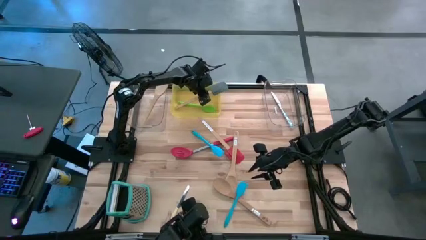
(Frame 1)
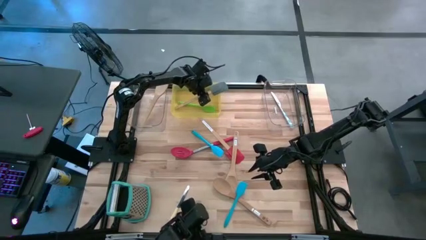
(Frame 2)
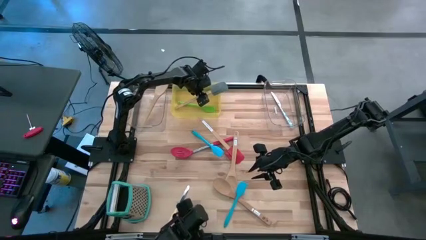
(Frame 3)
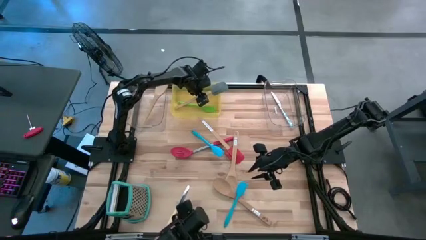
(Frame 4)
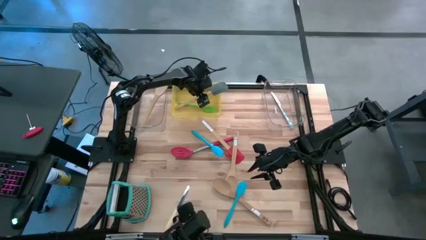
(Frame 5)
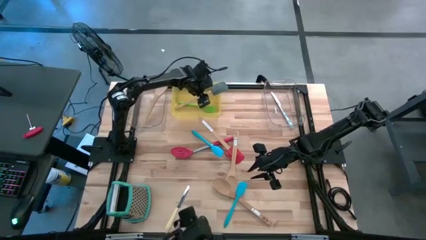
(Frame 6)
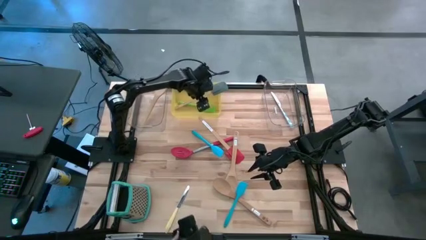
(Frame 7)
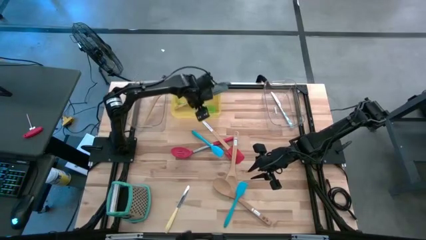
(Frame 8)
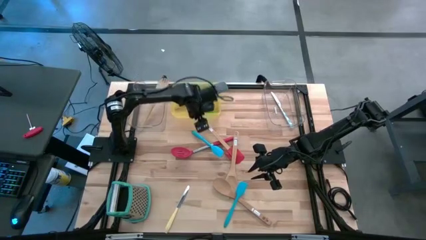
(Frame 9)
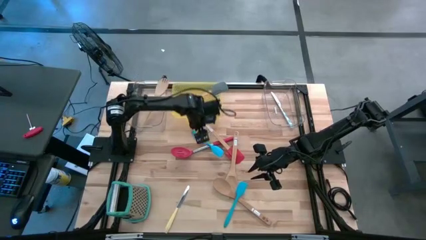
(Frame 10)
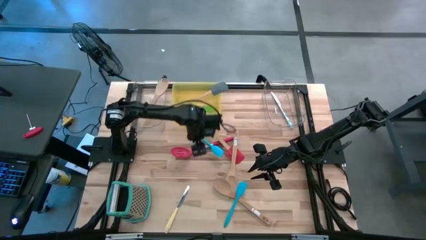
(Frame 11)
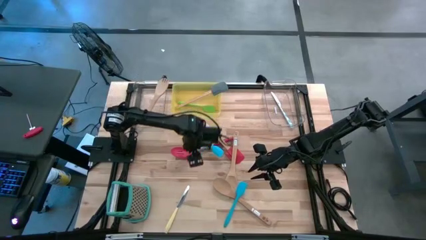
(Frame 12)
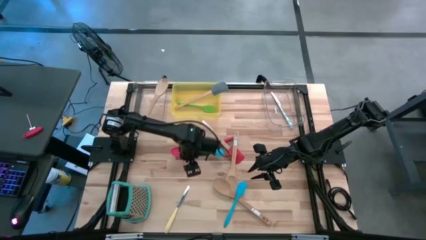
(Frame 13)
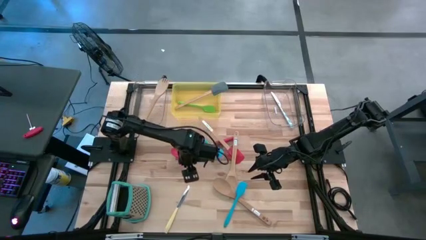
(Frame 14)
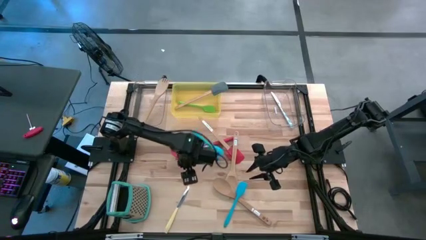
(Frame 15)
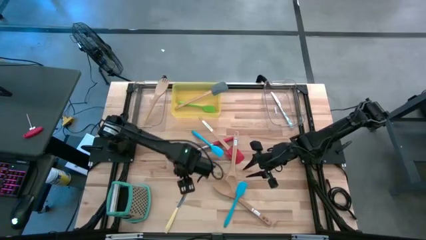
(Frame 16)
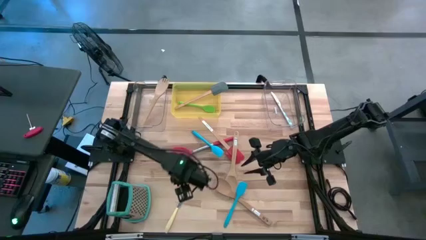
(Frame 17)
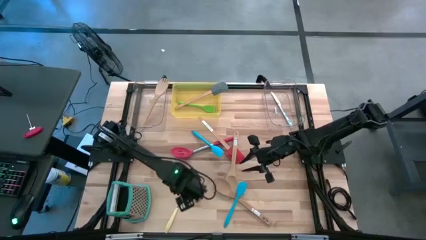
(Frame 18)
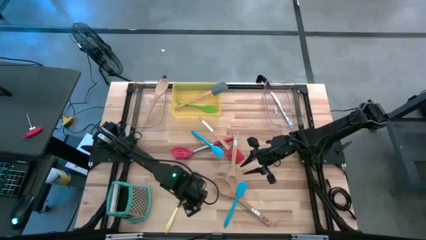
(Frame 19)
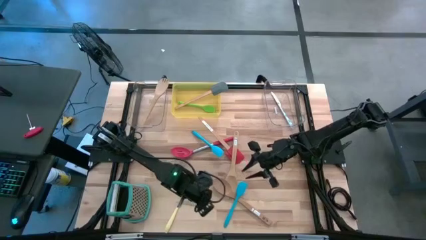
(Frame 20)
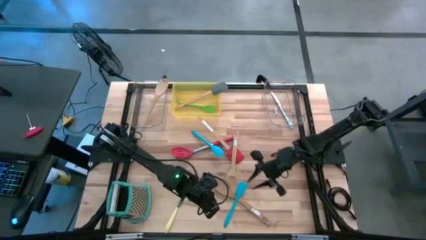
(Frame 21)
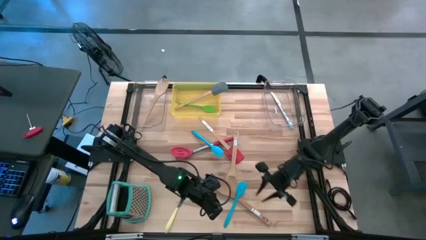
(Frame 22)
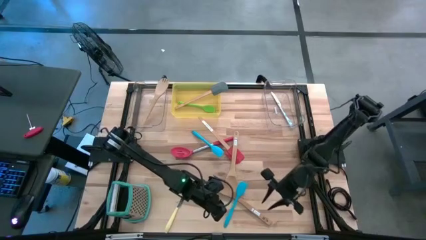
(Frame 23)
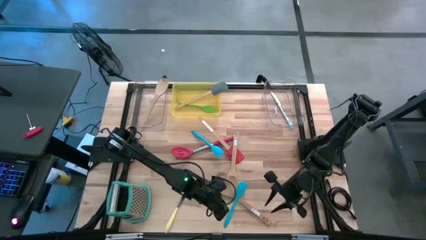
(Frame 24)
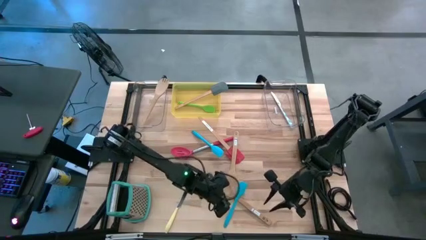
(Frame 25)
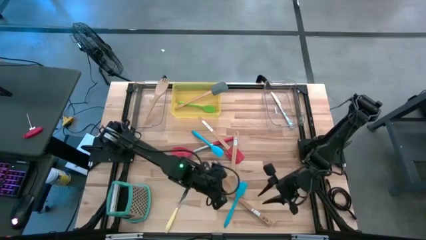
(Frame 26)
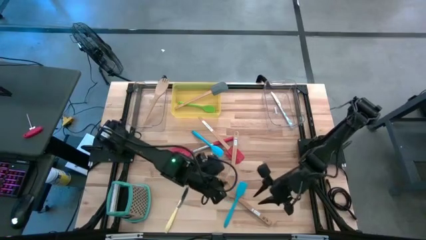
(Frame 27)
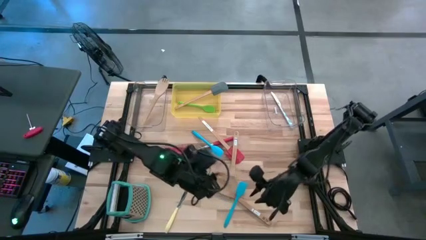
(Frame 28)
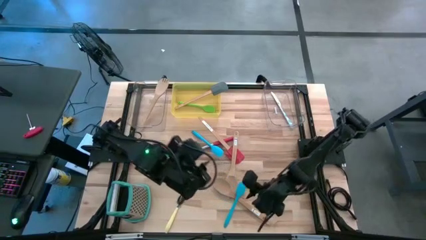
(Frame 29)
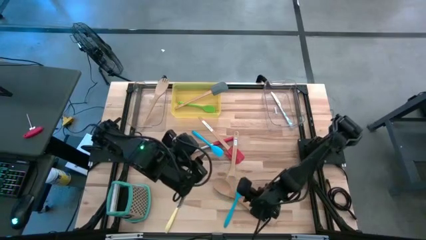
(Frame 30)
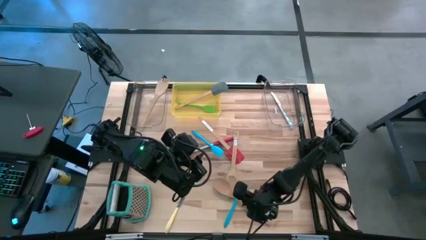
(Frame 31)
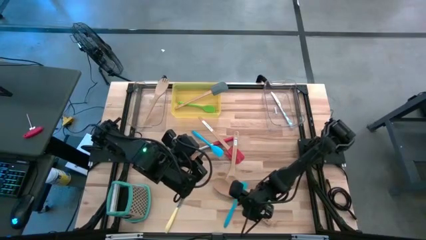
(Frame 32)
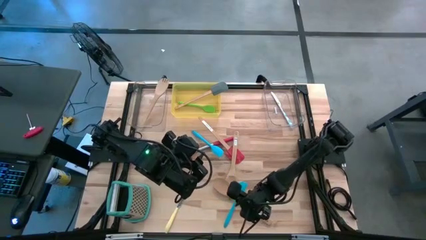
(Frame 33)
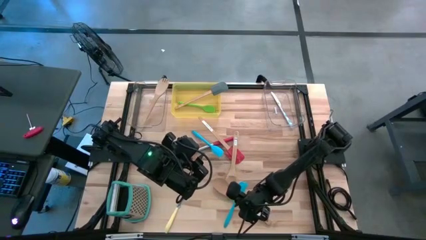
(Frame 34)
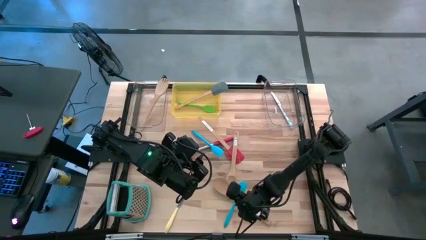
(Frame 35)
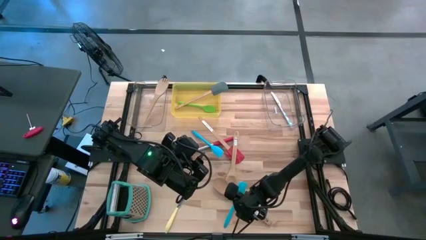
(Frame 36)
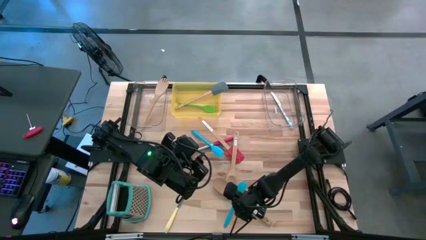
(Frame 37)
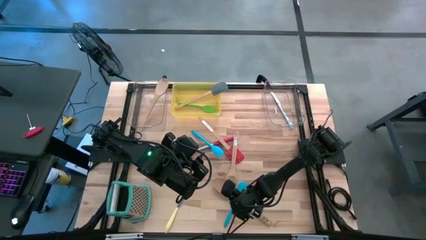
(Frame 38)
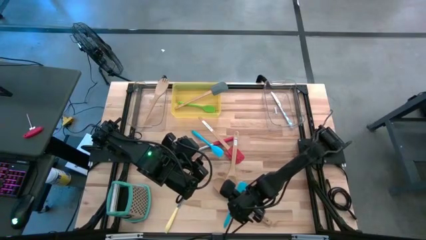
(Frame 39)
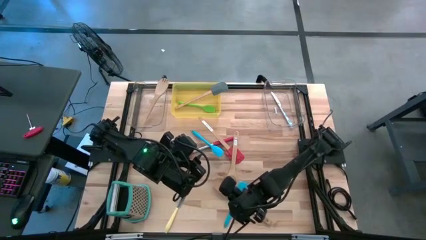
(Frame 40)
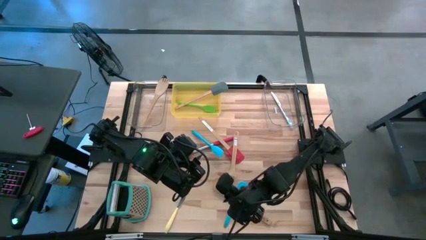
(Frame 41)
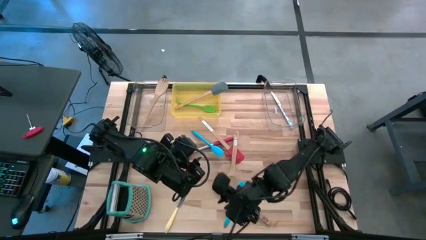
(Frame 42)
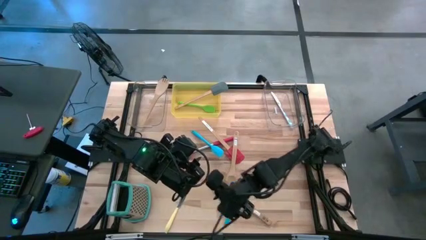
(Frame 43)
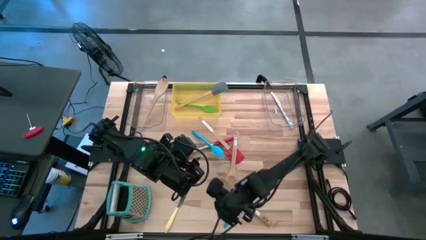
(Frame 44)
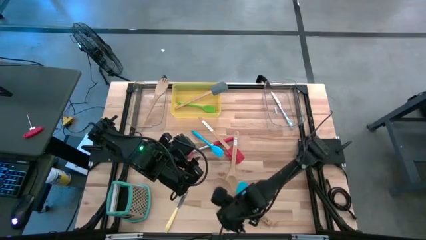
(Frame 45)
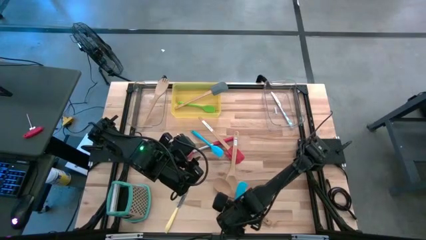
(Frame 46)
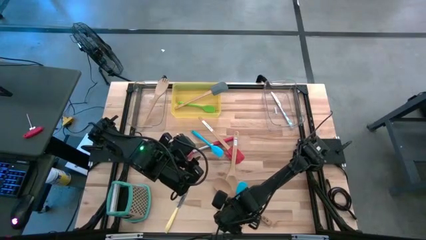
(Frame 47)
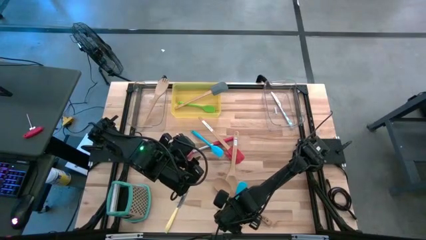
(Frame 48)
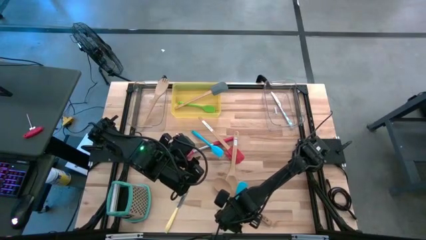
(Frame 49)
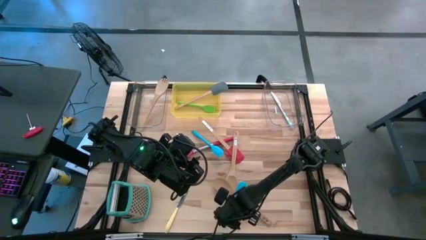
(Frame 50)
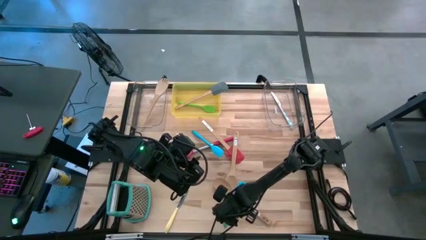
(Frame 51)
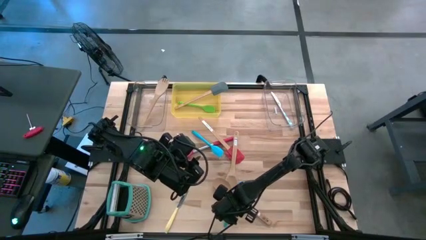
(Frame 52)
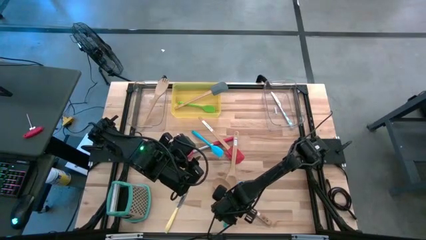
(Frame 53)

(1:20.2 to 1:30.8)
Task: Pick & Place Kitchen Items
Put the blue spatula into the yellow bin

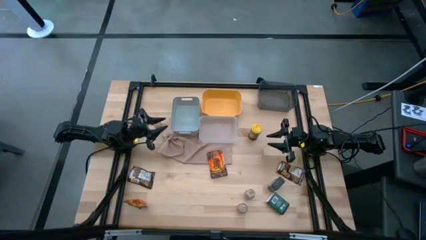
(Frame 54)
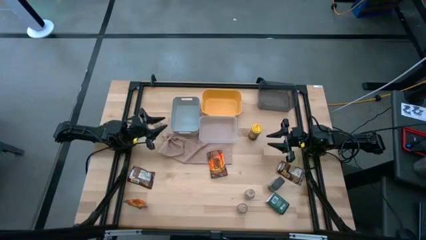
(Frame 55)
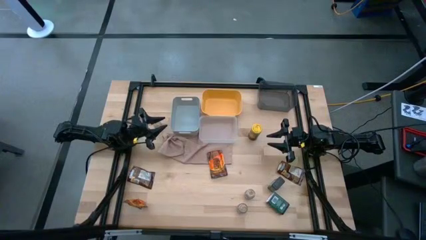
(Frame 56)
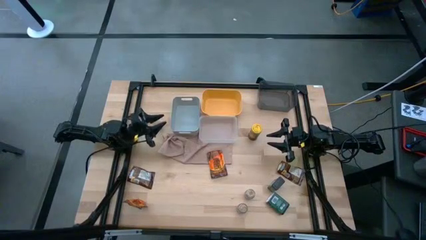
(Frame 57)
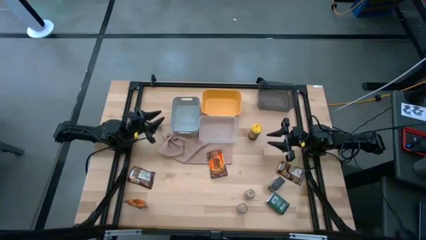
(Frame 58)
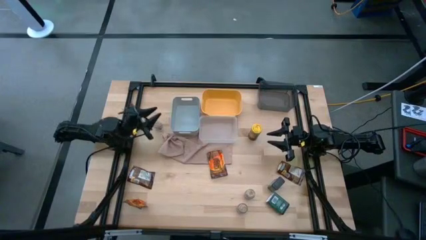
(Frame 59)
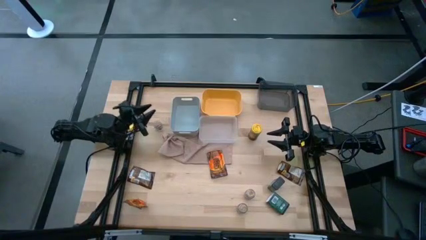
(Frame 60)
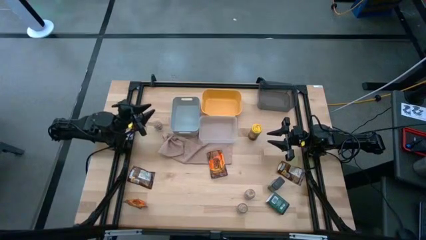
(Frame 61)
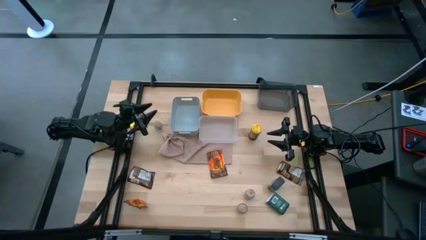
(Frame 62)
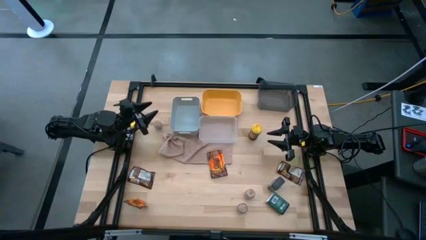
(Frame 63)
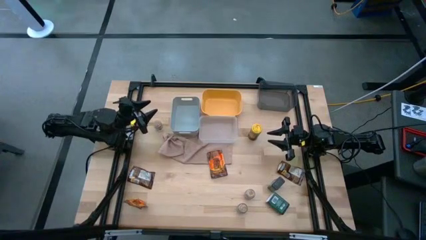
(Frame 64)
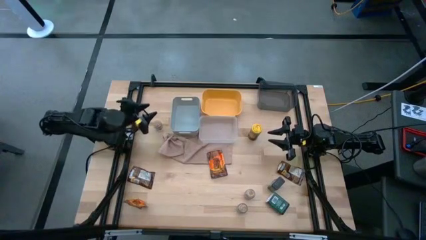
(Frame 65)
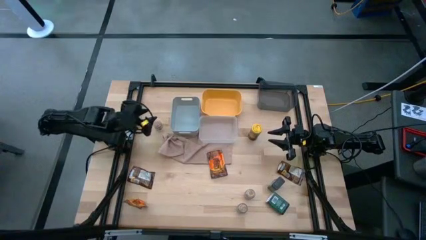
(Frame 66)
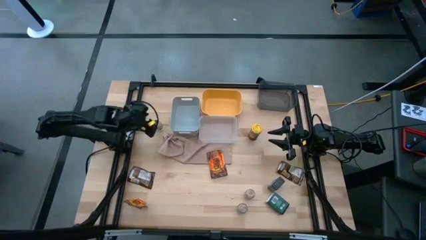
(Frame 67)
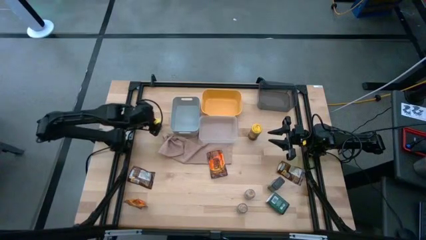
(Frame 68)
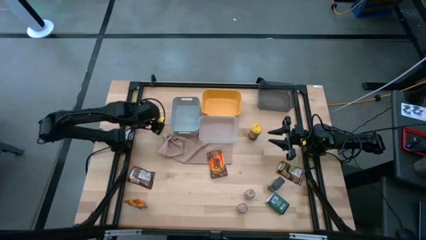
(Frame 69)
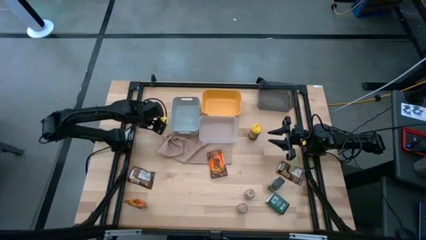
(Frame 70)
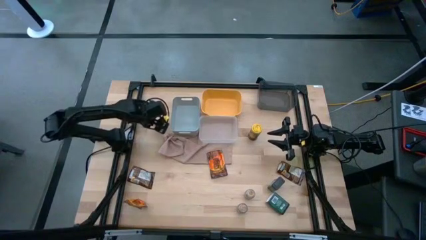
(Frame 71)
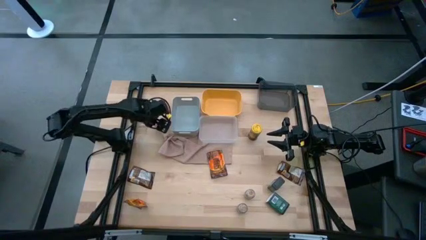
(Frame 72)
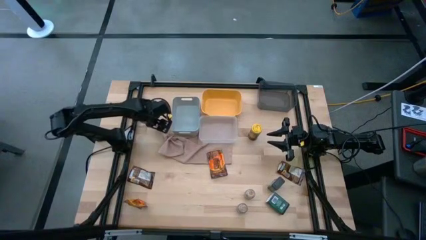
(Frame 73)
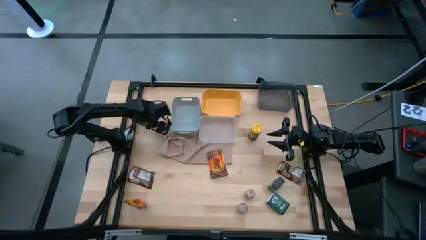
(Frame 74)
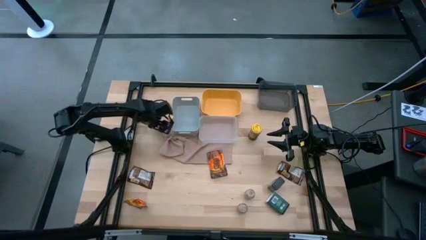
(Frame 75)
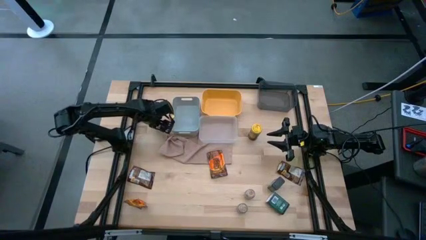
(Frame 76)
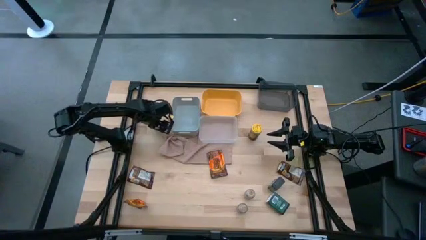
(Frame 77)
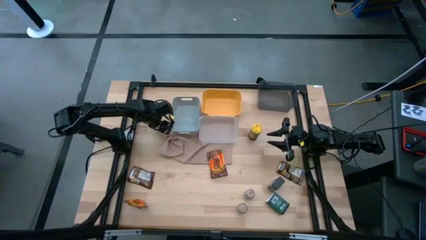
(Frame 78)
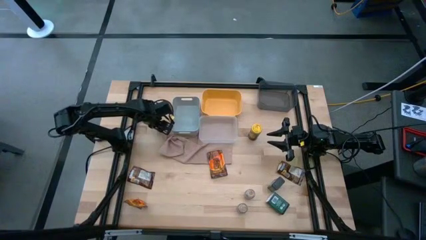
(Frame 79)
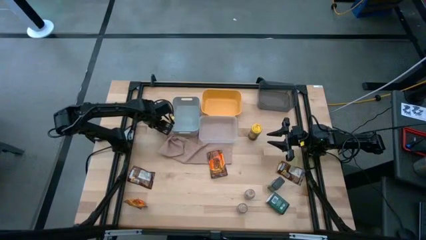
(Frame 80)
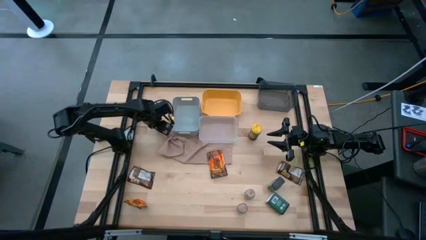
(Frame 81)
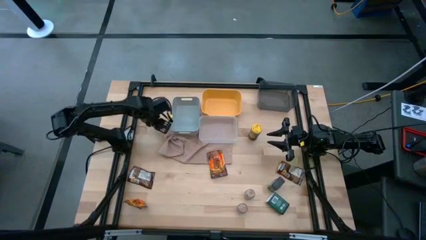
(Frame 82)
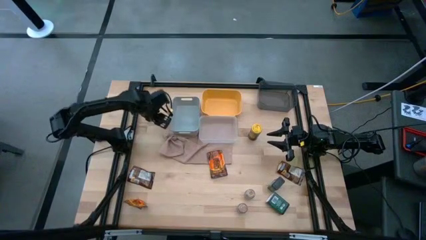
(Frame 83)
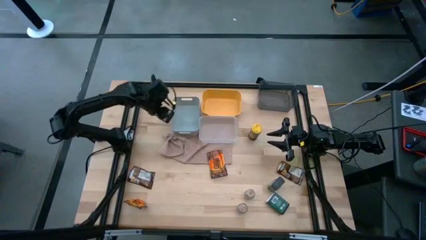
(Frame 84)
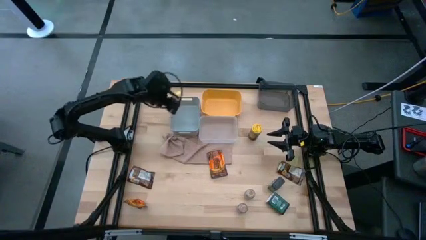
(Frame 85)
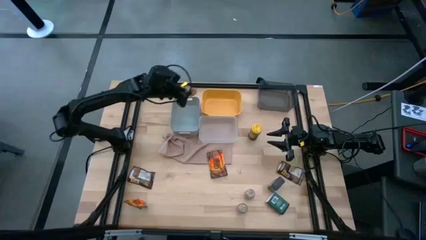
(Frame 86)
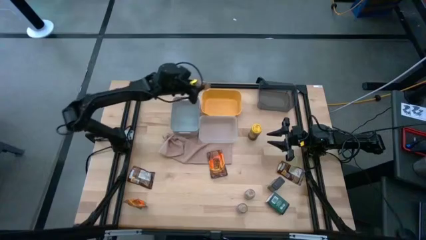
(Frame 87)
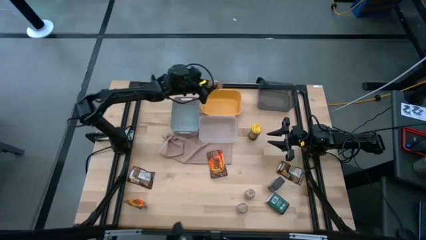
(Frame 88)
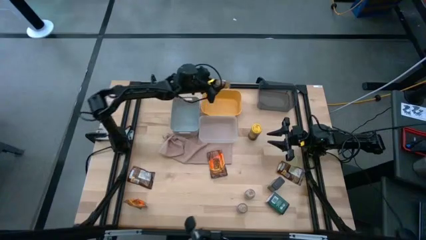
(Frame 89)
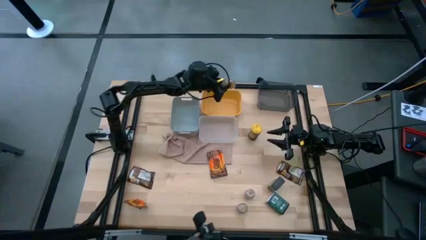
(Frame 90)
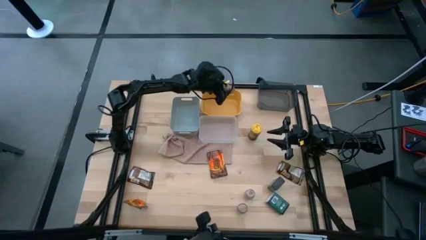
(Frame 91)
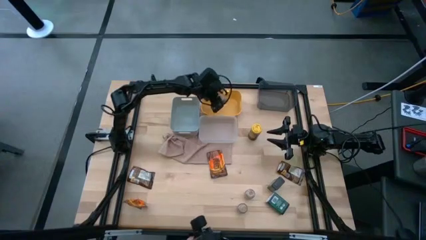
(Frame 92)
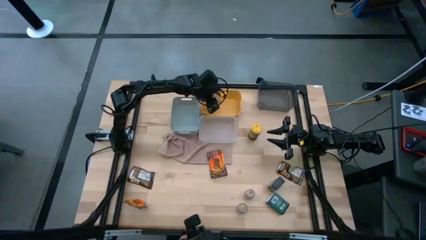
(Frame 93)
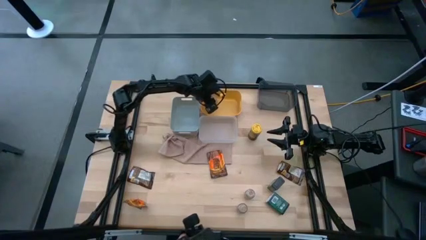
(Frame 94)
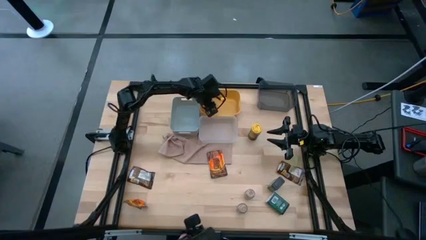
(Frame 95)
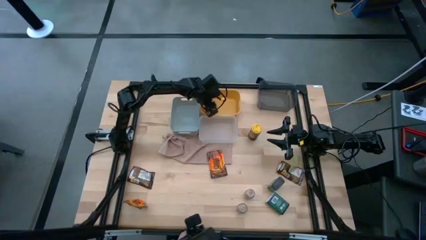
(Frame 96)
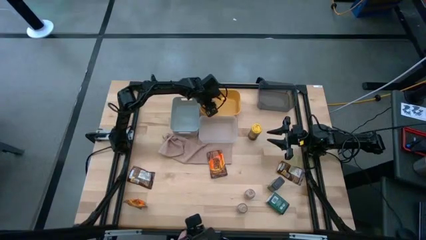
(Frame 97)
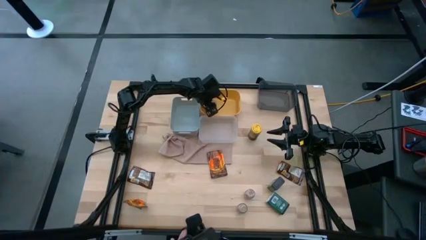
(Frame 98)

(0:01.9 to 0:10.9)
Task: Sort spices by type
Put the top left brown seasoning bottle into the yellow bin
